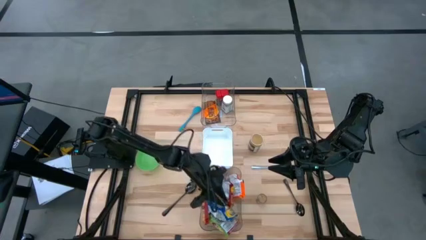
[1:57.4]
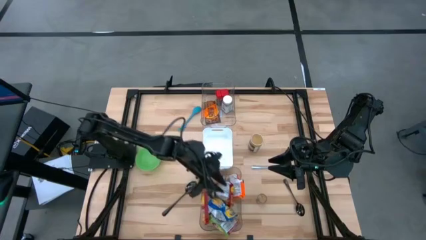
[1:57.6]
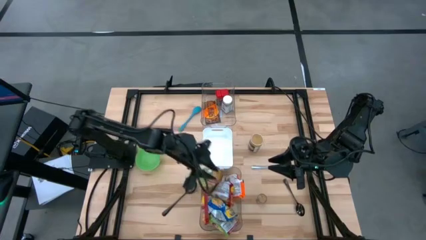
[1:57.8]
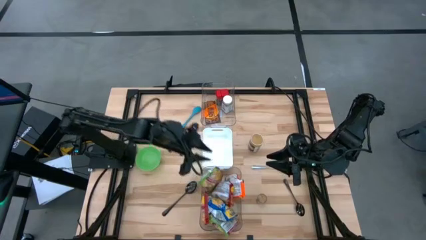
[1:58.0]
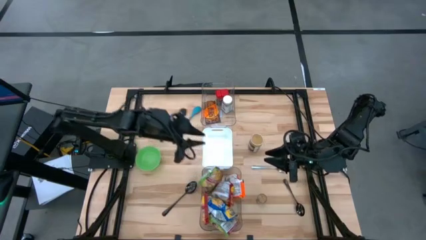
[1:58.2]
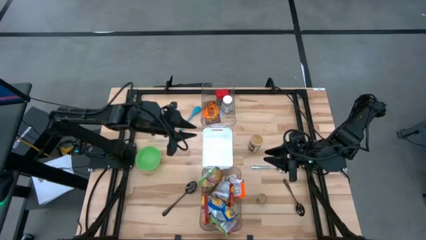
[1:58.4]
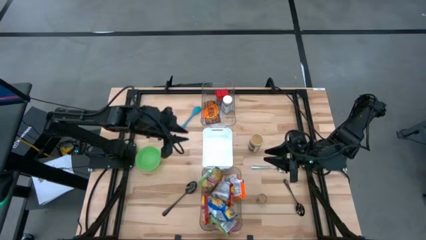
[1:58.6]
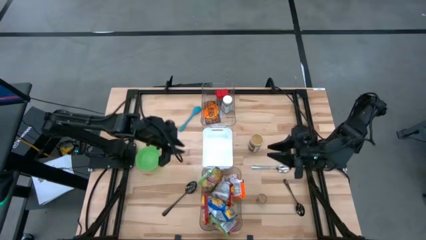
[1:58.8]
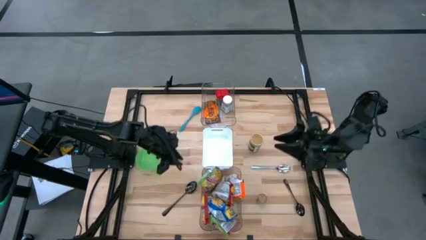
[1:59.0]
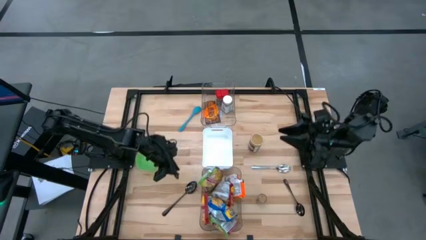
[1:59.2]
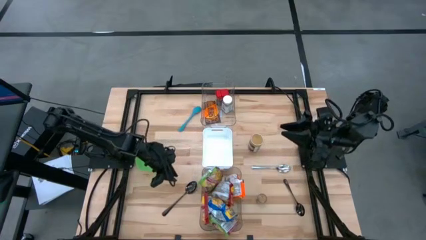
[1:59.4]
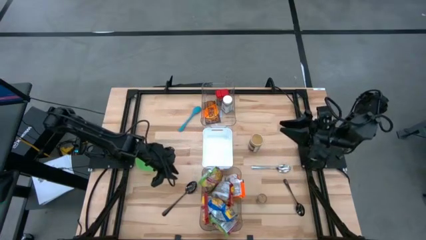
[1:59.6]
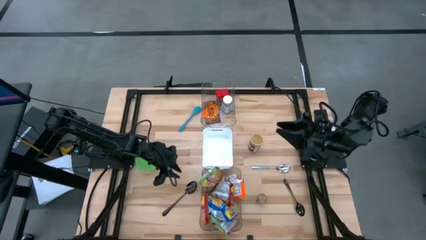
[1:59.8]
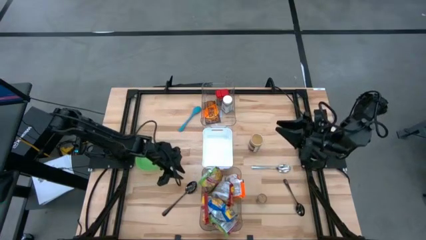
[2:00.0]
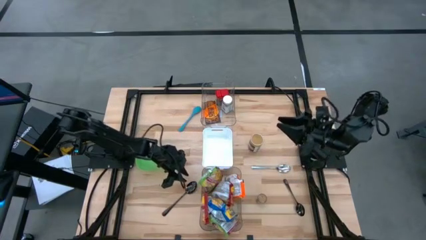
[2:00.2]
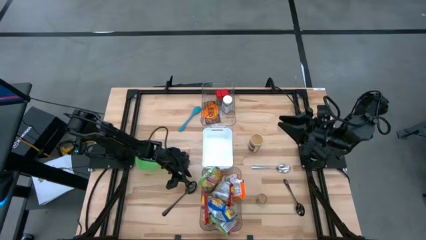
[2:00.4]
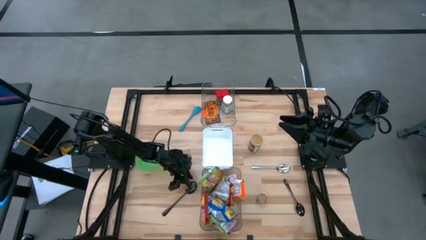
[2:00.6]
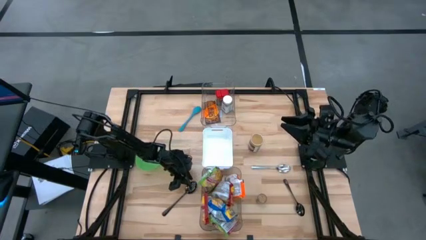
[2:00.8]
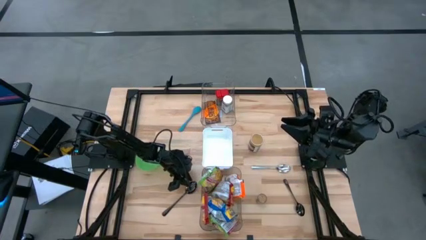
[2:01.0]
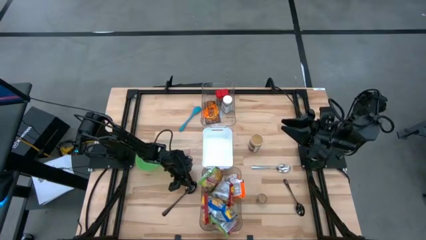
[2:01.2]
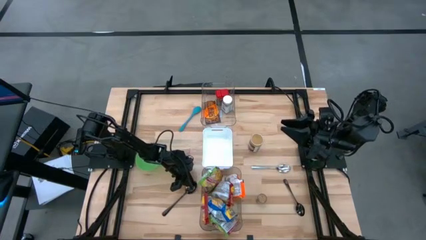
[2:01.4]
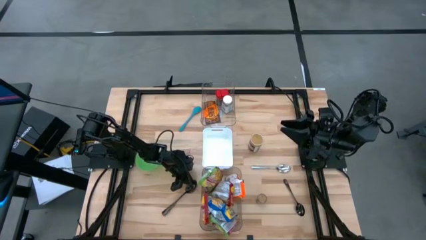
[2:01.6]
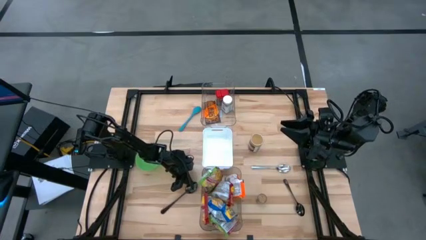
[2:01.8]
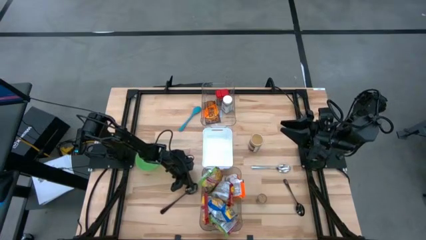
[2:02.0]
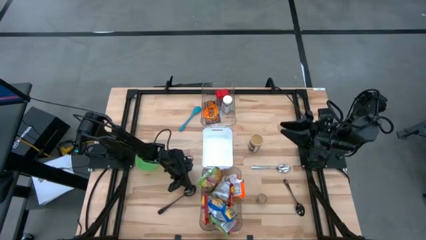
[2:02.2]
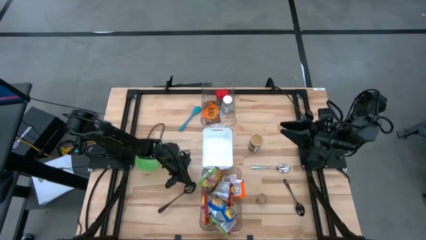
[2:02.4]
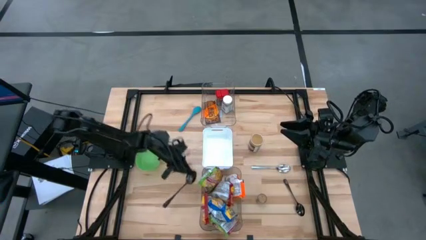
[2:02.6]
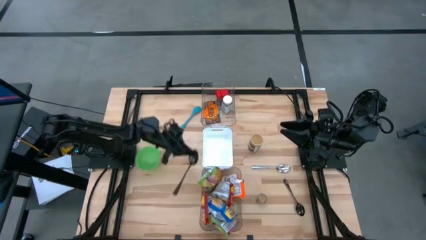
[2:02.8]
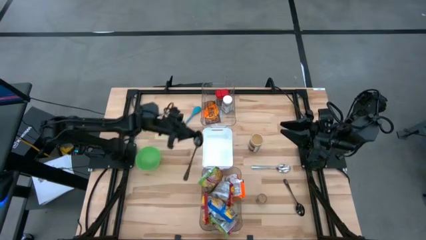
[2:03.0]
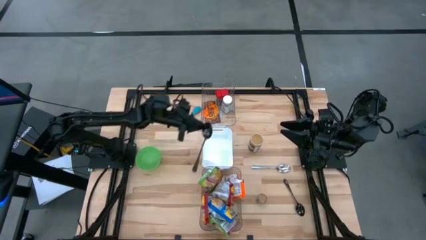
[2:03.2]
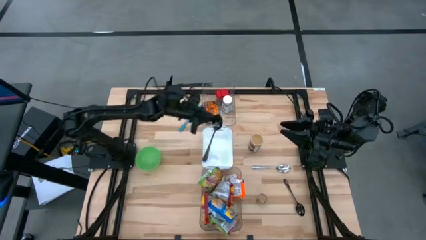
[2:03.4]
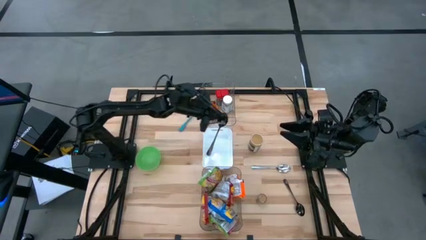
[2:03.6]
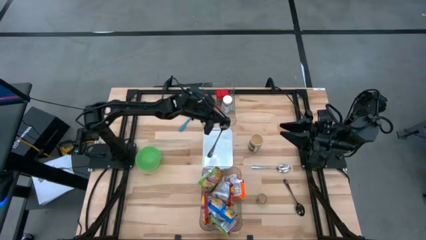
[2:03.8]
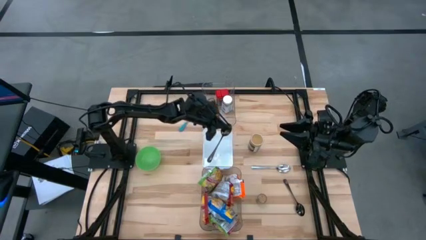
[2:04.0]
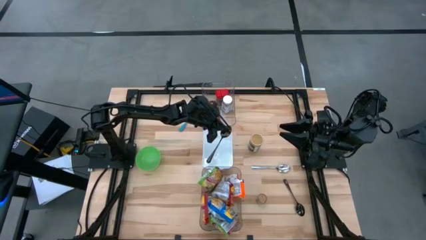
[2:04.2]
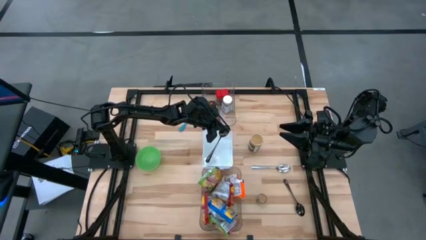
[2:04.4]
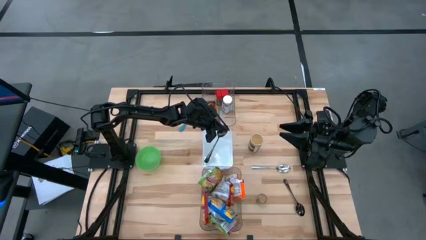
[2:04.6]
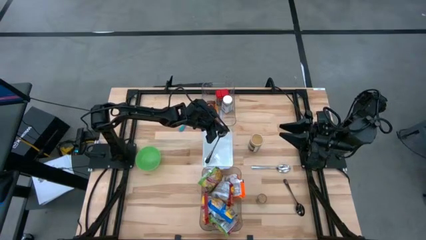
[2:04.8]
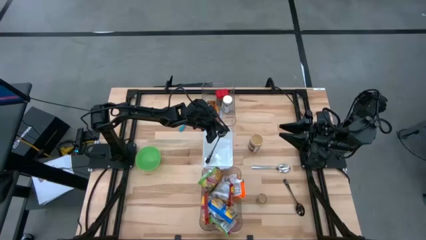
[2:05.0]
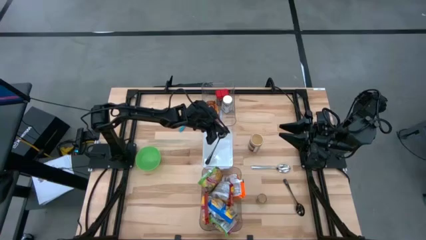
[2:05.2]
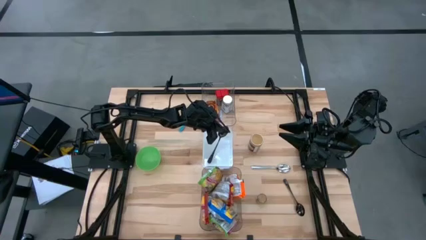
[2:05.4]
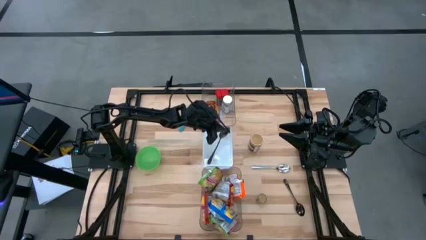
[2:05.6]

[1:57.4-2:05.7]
Task: Pick & Place Food Item
Put the left black spoon into the white bin

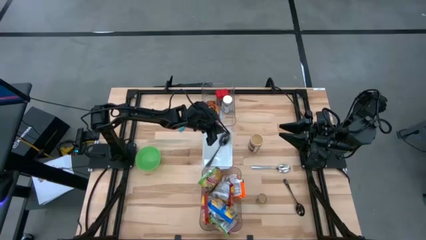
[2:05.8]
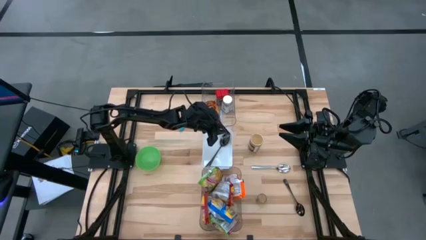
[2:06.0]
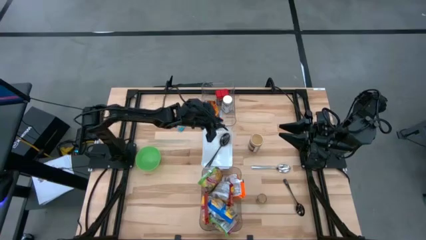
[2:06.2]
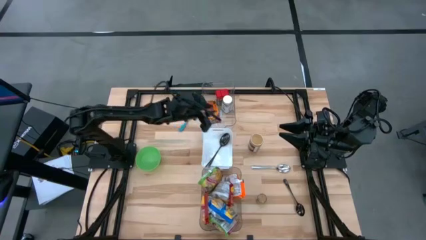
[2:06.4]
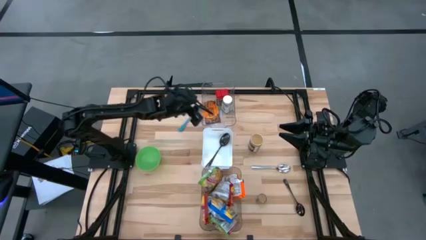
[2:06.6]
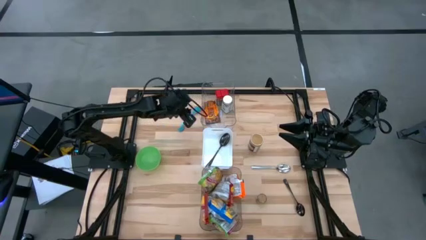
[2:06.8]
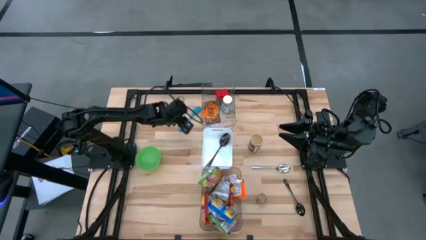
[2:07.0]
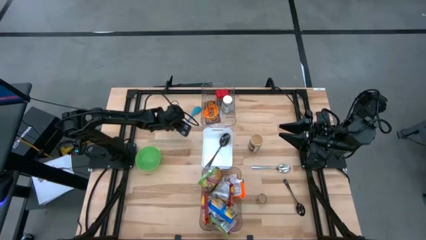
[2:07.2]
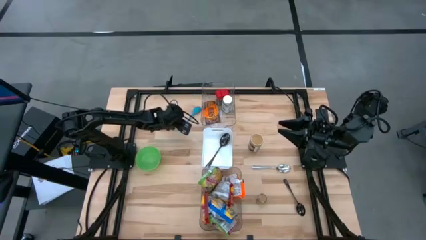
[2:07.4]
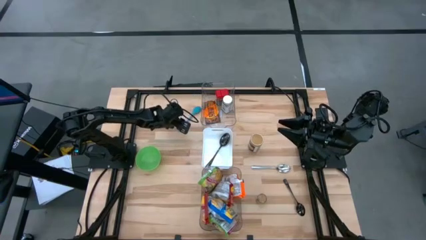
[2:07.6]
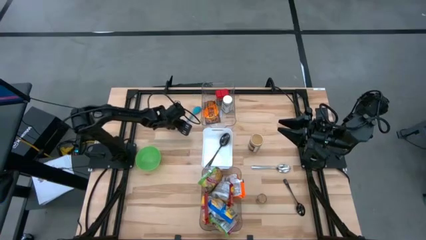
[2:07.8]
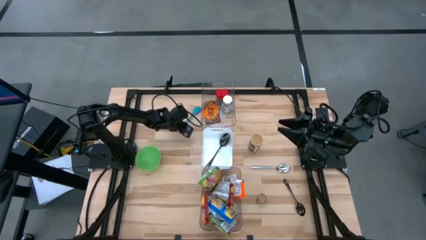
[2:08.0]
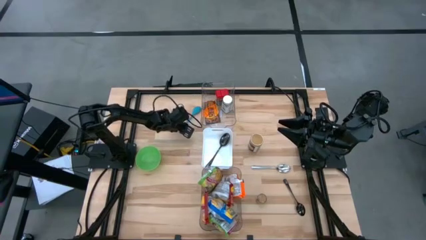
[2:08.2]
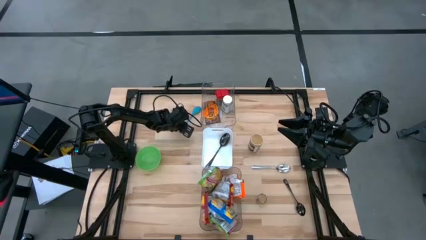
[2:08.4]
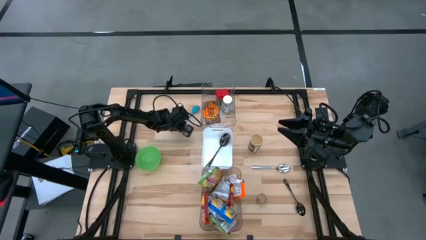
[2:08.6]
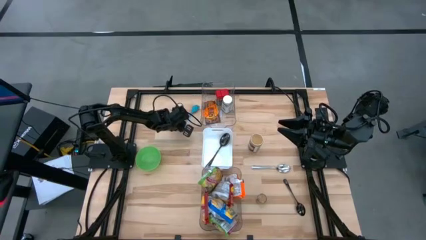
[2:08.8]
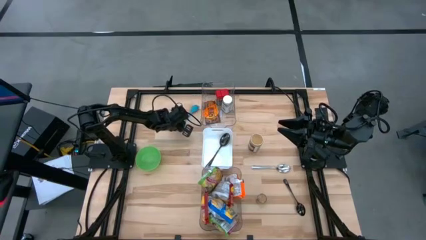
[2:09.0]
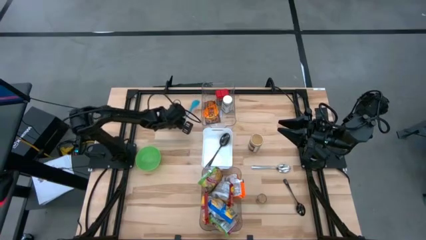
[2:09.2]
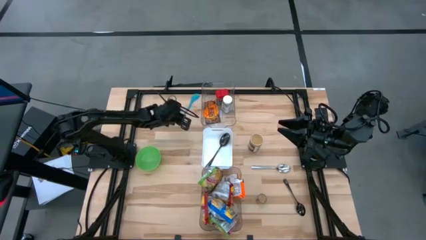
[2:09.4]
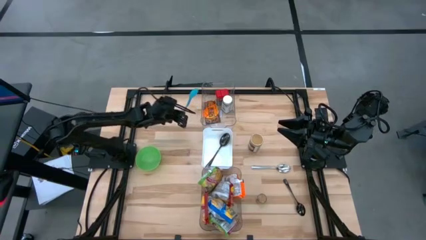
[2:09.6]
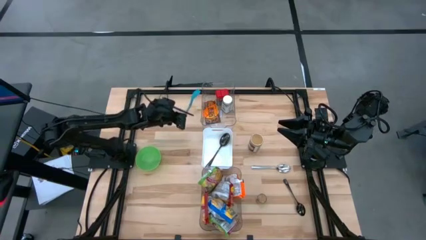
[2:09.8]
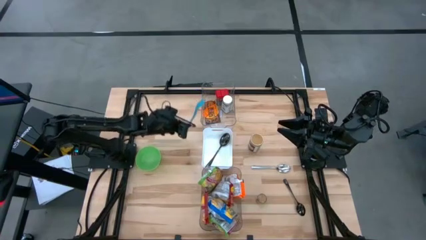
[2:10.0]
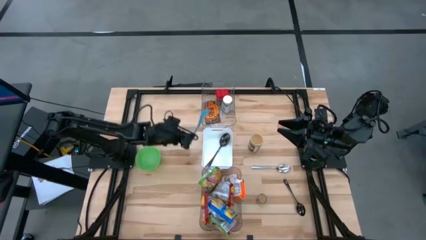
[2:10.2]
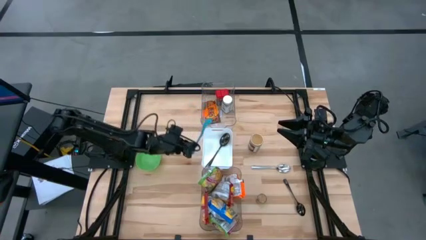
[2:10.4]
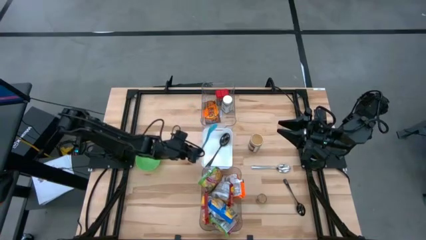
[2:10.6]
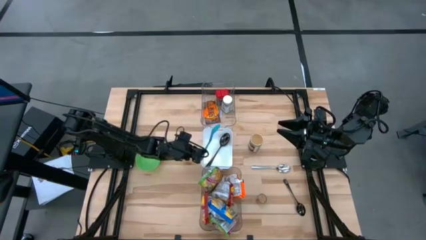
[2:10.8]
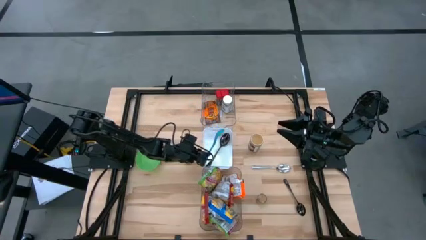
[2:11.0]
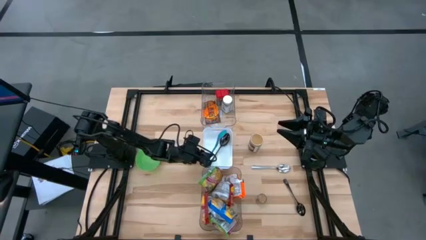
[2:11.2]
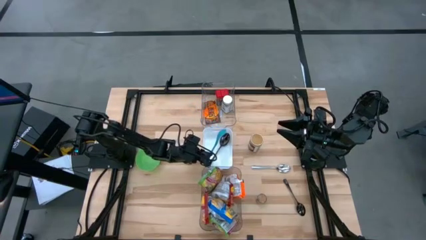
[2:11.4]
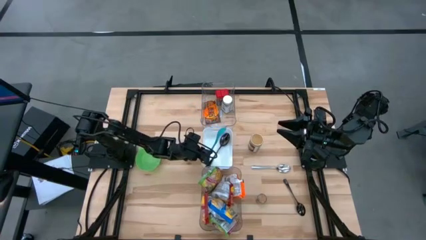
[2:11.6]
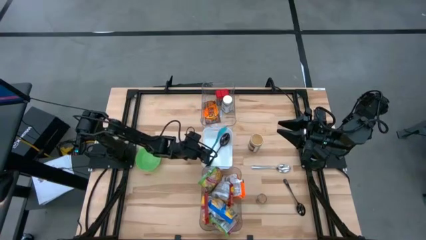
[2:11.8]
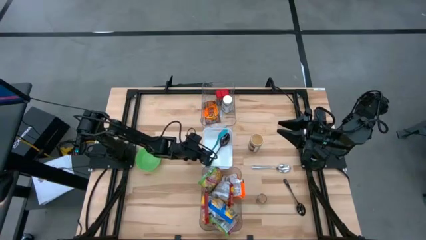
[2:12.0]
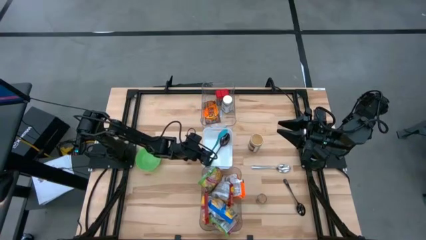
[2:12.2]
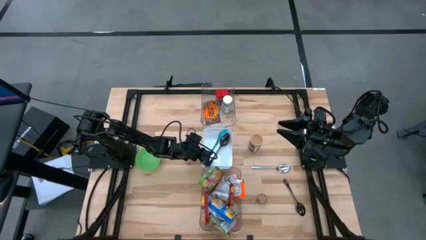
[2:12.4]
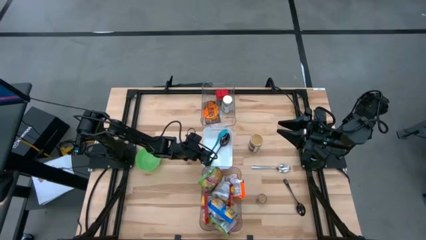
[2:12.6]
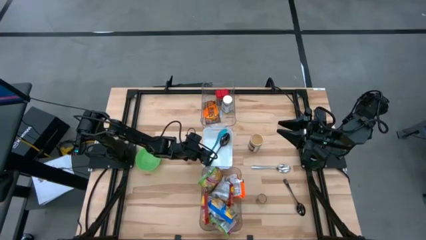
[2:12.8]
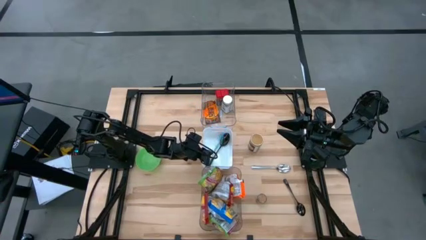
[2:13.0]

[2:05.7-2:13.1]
Put the blue baby spoon into the white bin

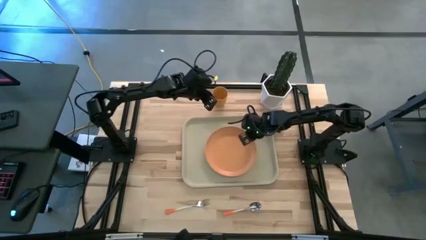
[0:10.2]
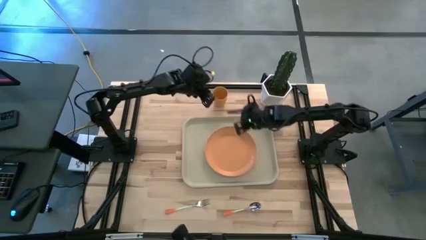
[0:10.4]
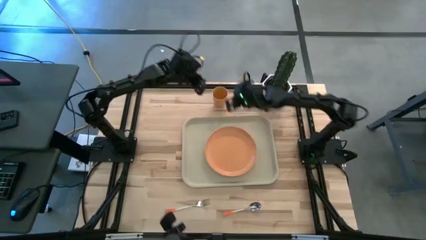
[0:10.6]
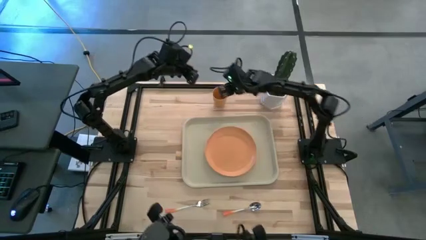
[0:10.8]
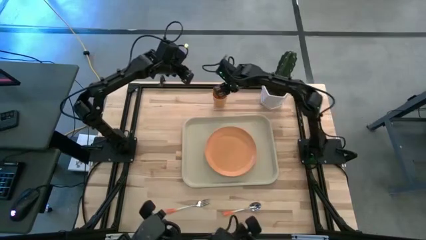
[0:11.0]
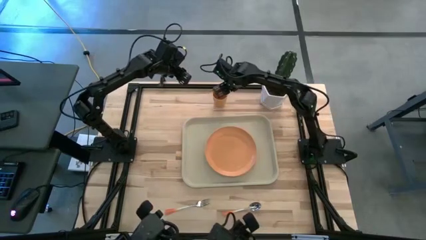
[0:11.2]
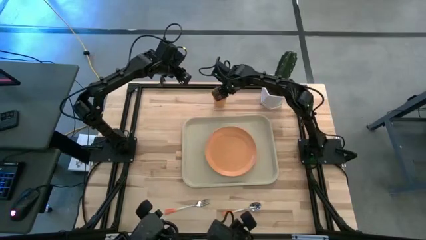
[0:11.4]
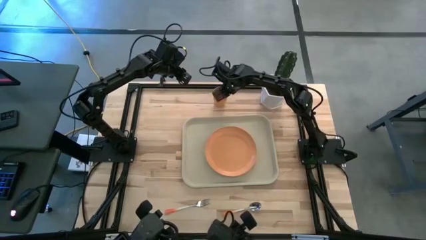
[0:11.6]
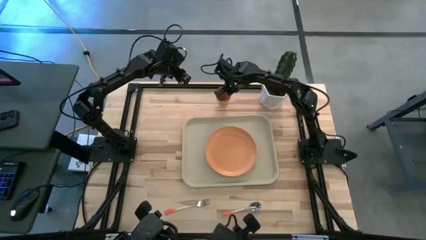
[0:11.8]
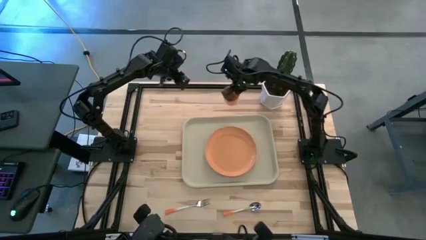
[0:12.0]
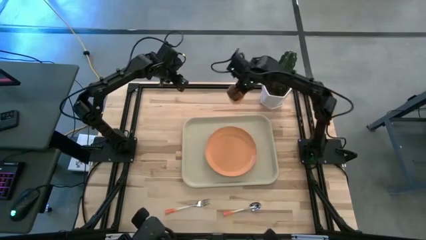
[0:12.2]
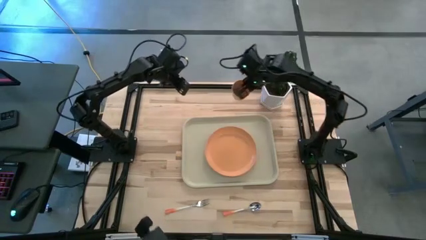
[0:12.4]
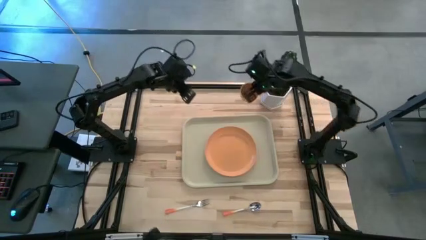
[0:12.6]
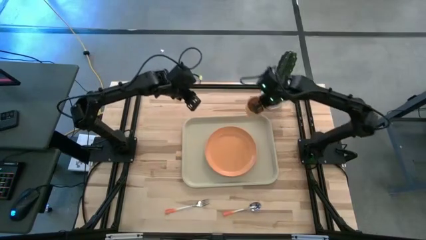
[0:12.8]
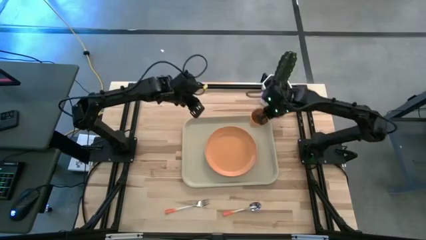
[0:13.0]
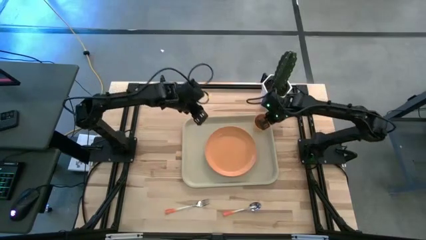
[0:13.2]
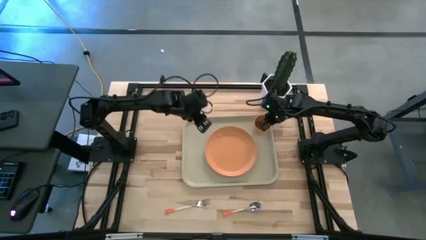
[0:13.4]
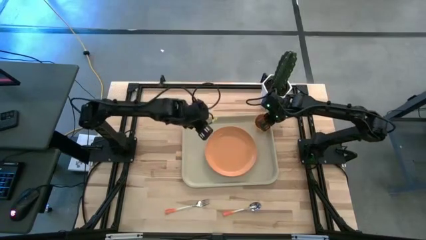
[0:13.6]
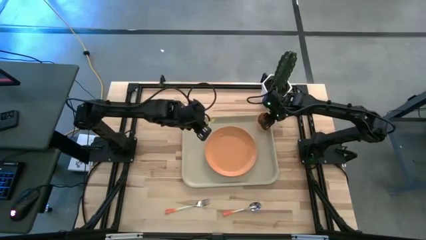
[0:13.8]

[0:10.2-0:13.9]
Task: Pick and place plate/cup/fork/spoon on tray
Put the orange up on the brown serving tray
